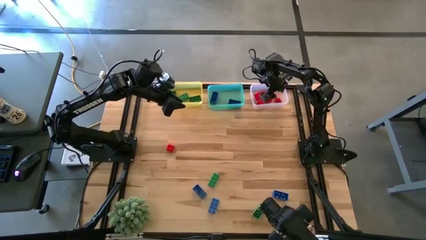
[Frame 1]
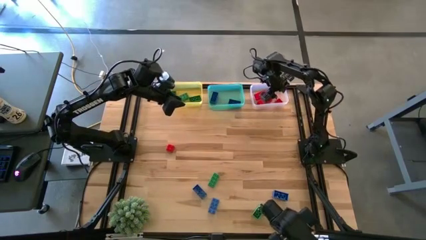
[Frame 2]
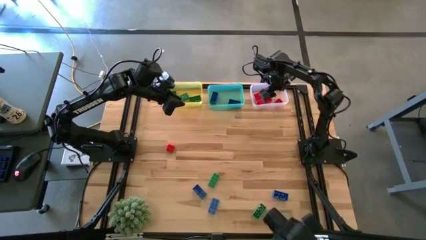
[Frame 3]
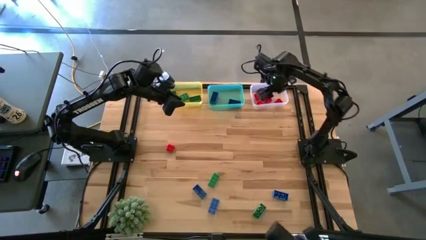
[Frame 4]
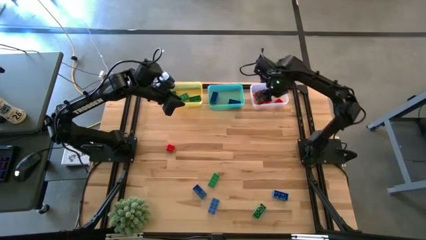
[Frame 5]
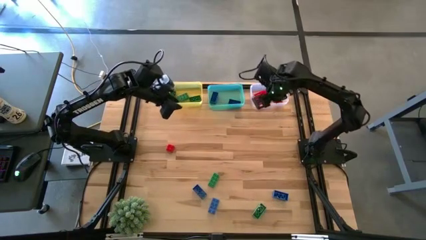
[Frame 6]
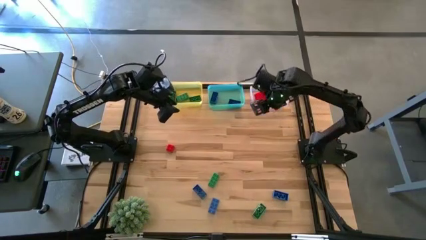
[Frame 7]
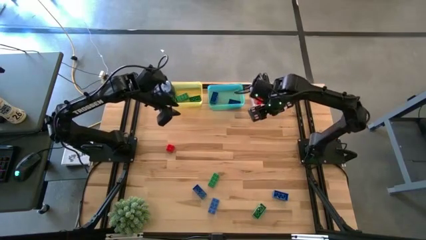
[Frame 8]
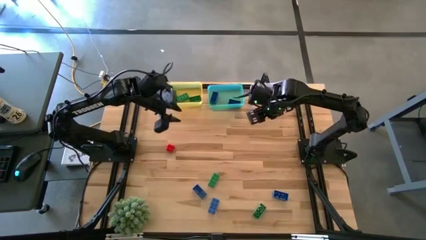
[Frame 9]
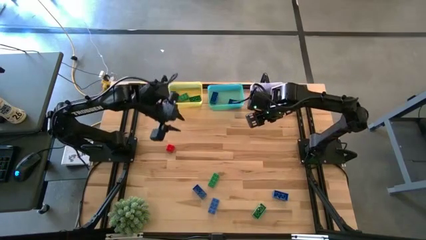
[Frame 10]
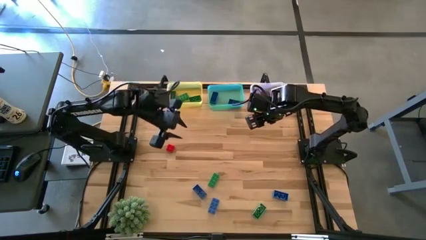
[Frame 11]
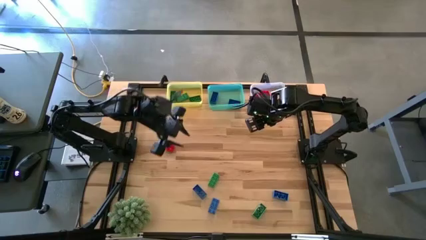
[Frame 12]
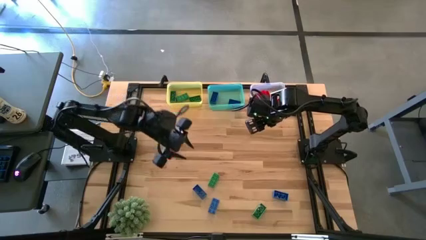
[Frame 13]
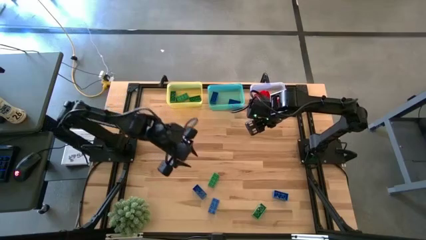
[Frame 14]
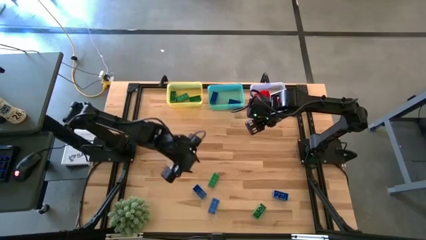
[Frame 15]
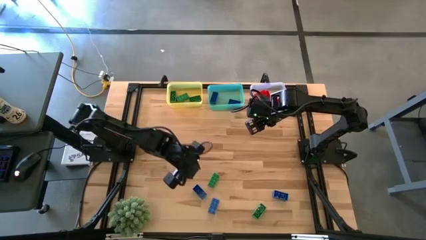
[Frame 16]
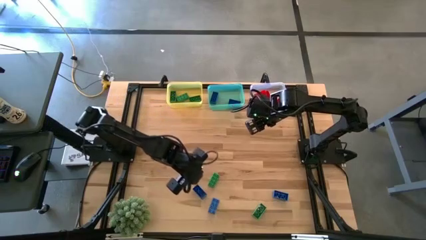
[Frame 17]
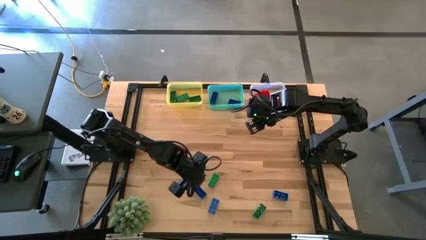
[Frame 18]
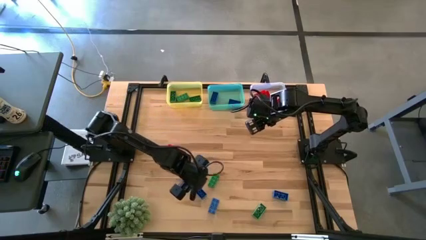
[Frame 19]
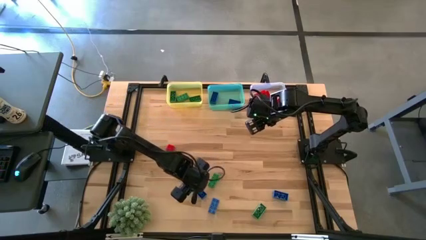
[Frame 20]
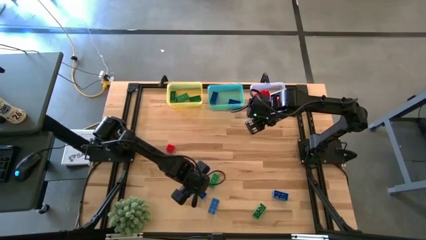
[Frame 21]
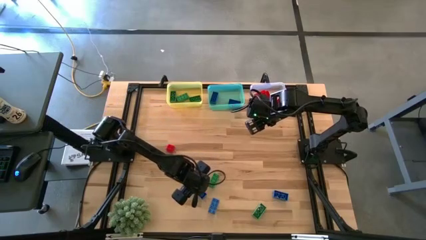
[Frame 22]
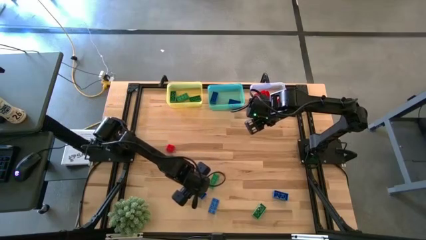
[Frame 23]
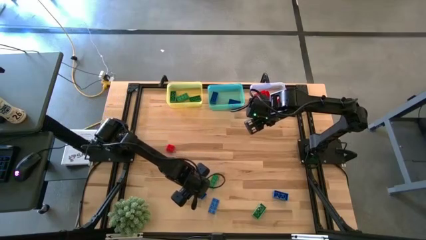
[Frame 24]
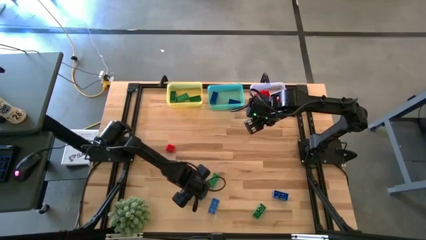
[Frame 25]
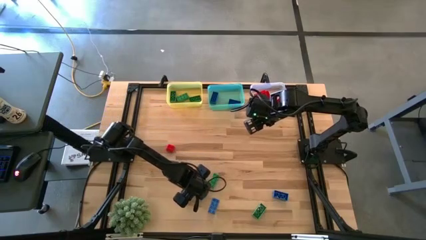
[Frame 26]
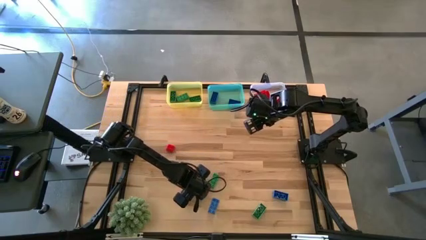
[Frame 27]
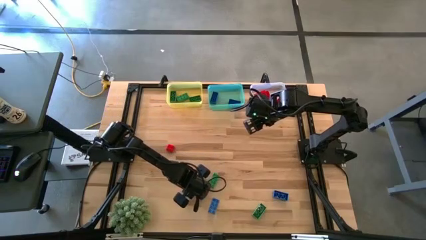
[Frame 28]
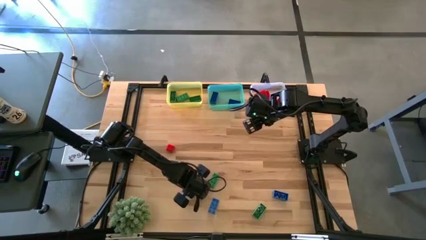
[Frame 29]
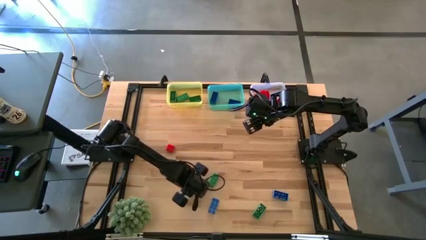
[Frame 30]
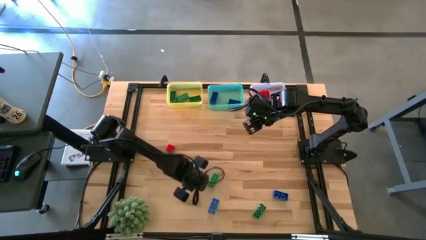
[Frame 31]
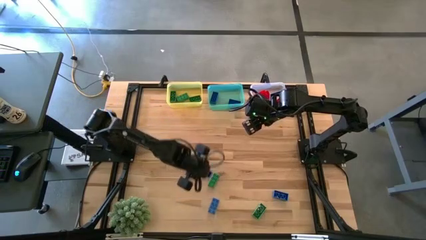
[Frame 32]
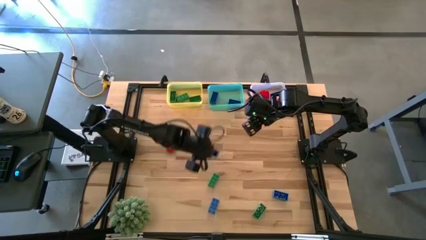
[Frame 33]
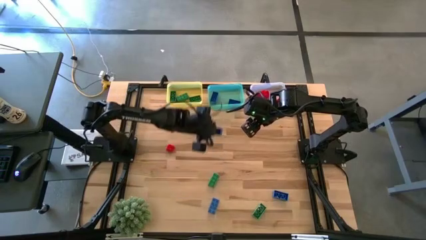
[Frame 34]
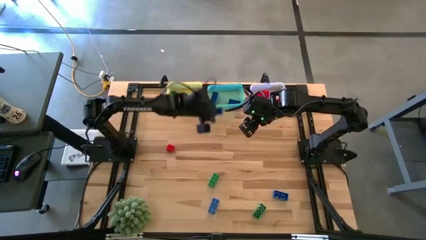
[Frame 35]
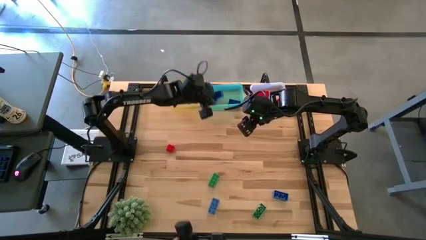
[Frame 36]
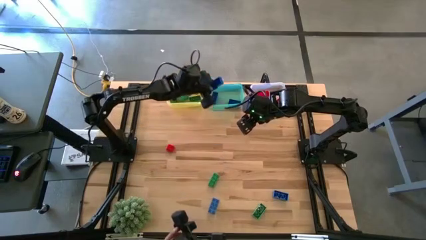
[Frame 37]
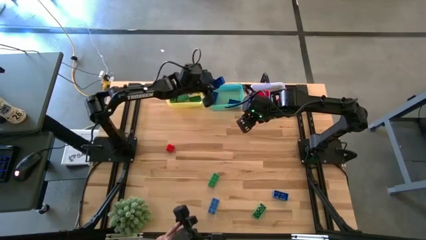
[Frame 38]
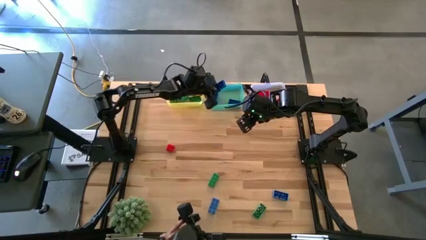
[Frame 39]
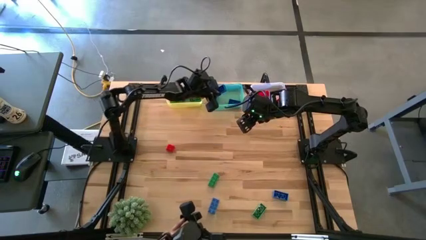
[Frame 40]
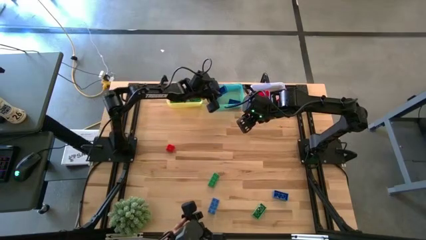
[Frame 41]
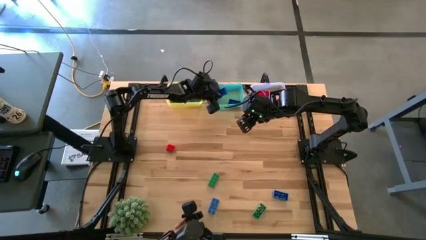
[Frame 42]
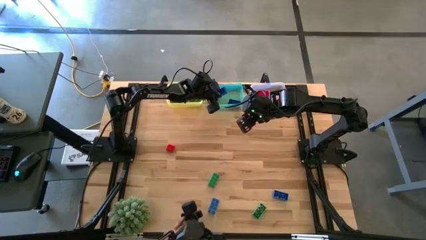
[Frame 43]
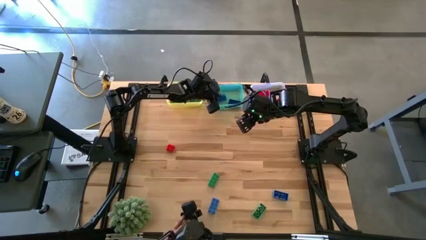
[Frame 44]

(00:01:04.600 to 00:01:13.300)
Task: Sort & place blocks by color
Put the blue game piece into the blue bin

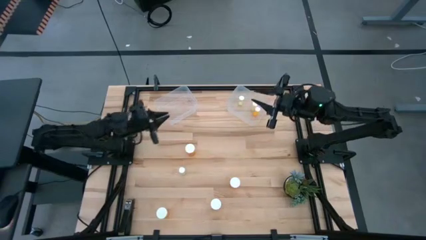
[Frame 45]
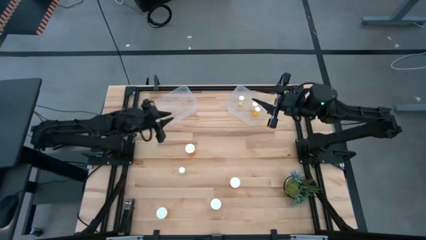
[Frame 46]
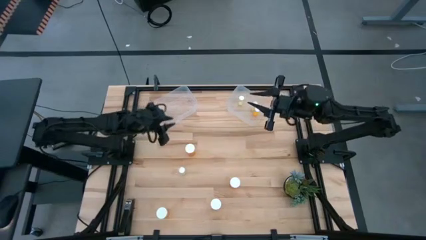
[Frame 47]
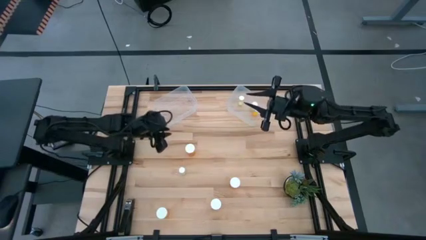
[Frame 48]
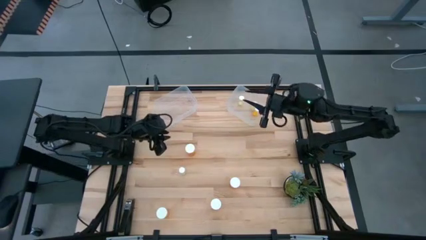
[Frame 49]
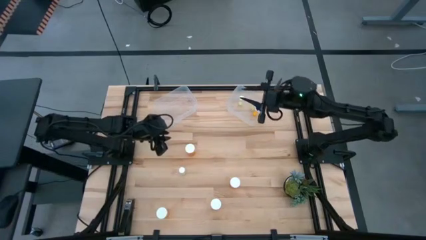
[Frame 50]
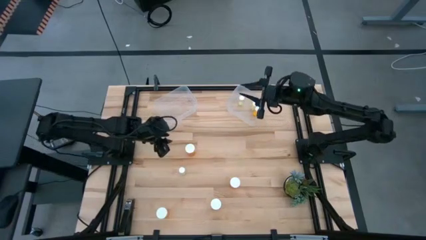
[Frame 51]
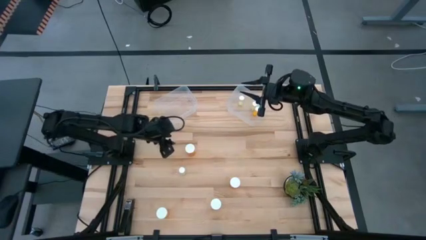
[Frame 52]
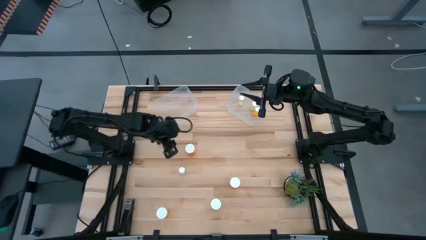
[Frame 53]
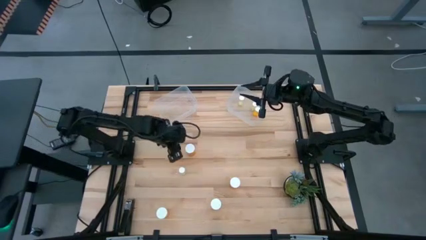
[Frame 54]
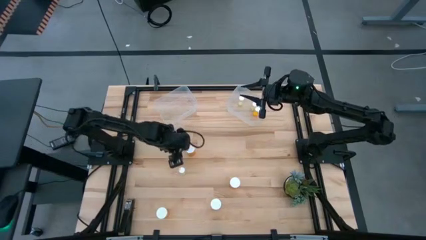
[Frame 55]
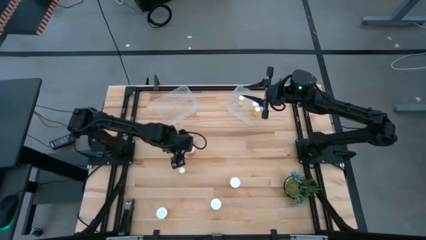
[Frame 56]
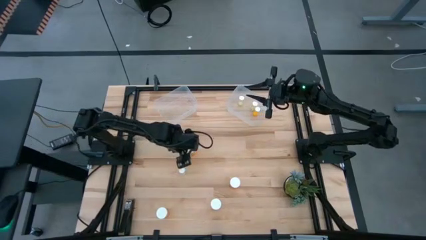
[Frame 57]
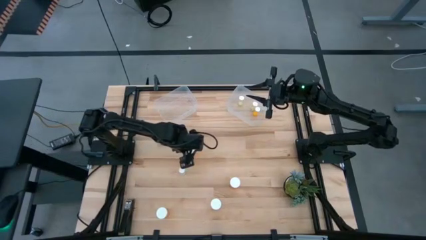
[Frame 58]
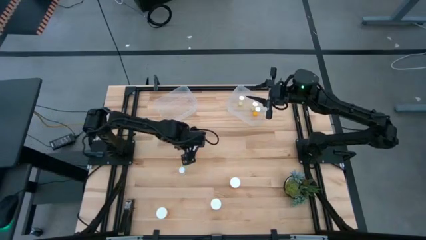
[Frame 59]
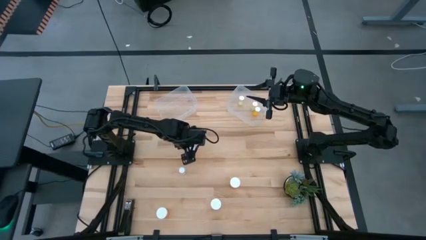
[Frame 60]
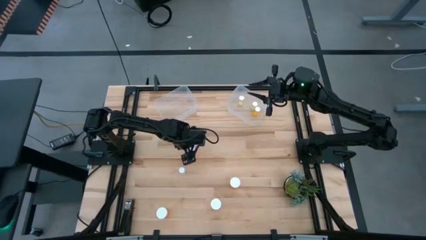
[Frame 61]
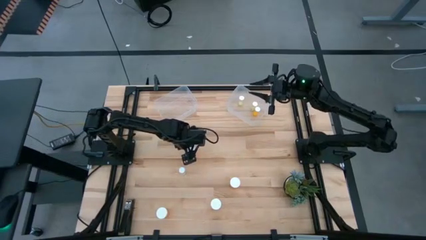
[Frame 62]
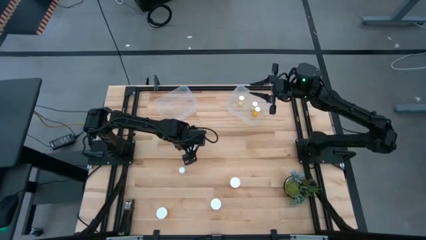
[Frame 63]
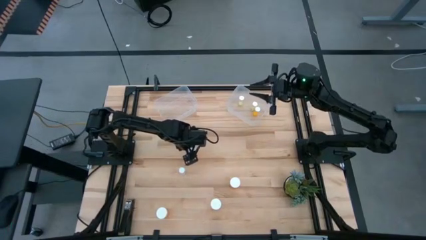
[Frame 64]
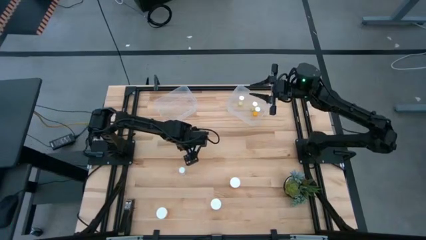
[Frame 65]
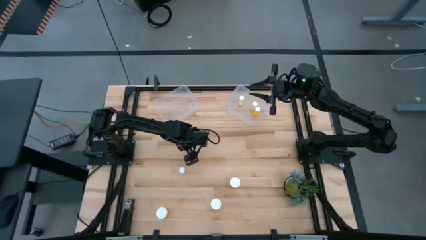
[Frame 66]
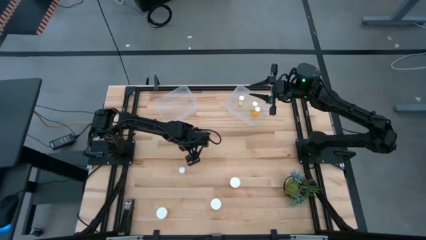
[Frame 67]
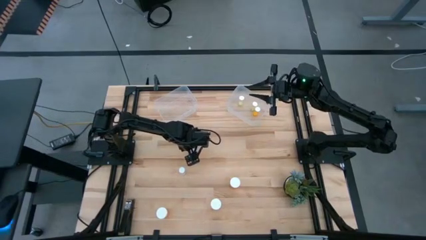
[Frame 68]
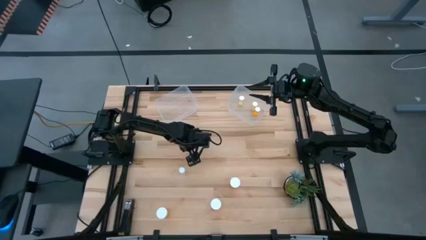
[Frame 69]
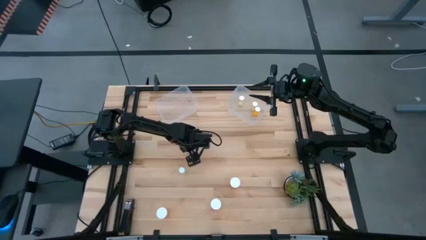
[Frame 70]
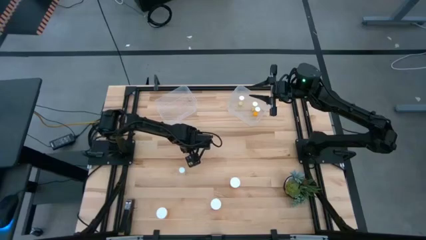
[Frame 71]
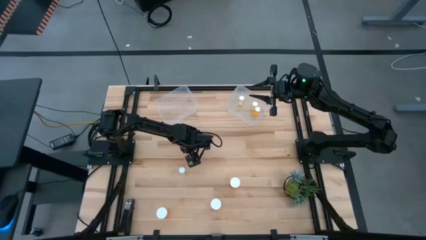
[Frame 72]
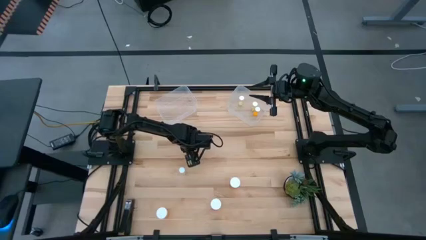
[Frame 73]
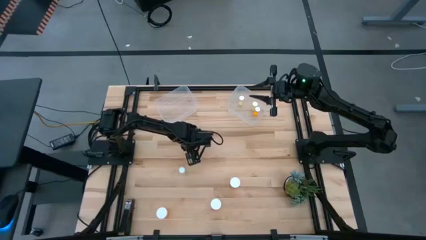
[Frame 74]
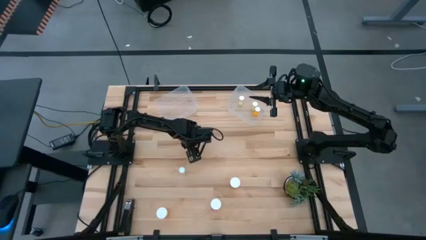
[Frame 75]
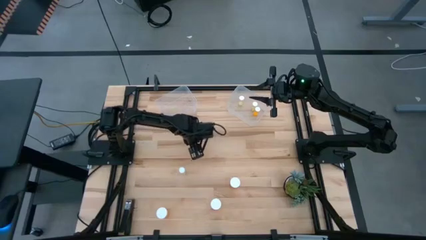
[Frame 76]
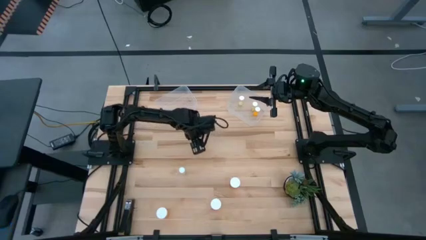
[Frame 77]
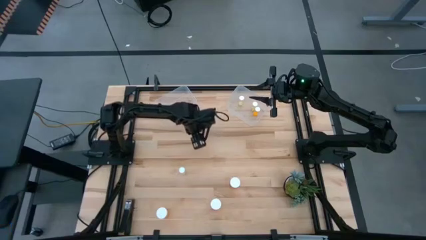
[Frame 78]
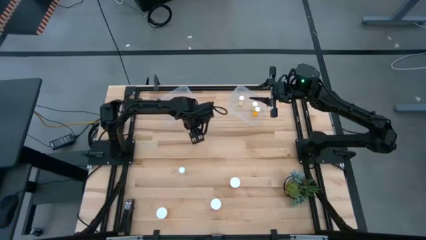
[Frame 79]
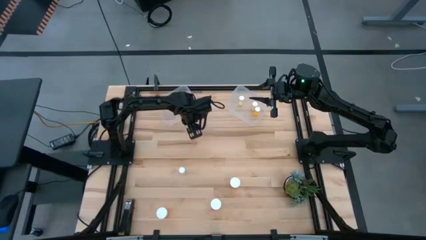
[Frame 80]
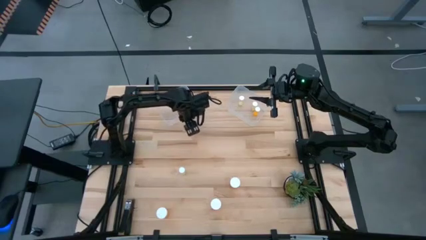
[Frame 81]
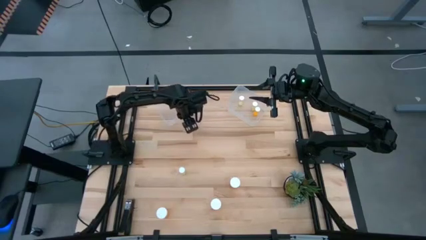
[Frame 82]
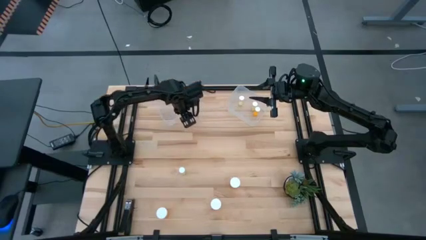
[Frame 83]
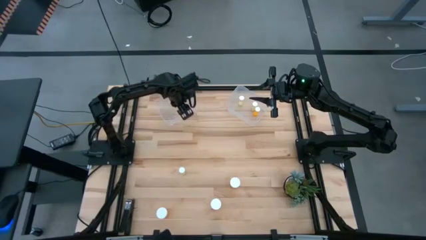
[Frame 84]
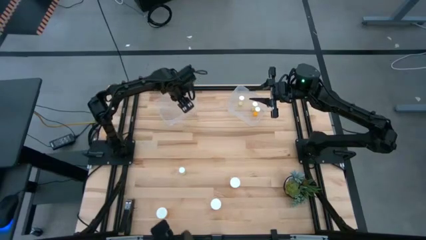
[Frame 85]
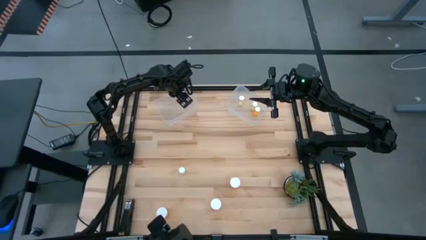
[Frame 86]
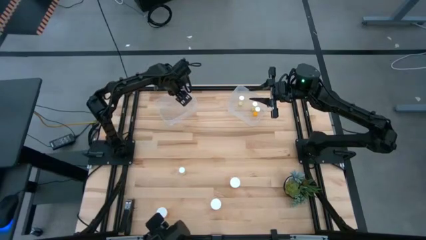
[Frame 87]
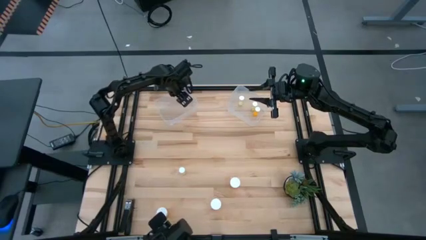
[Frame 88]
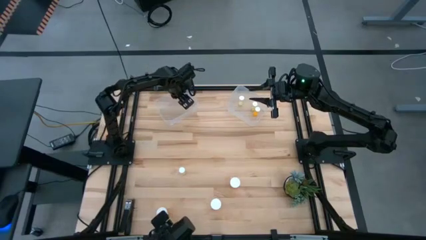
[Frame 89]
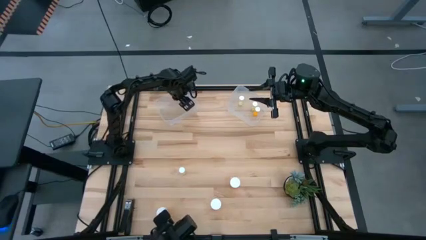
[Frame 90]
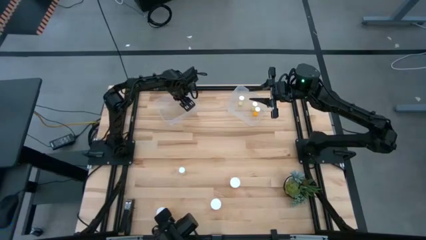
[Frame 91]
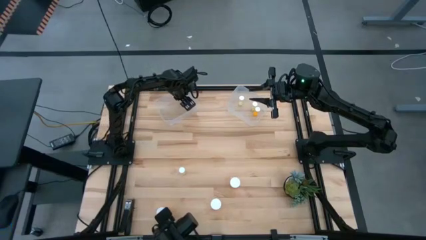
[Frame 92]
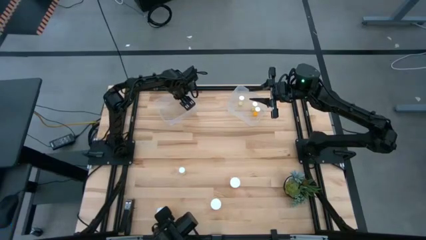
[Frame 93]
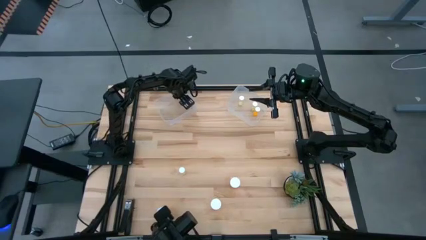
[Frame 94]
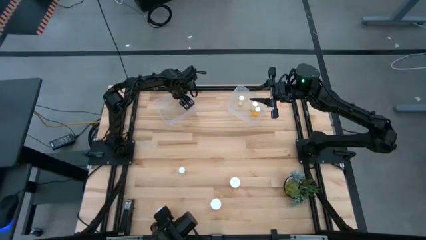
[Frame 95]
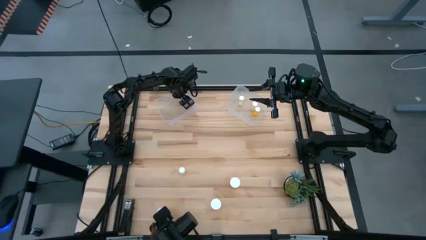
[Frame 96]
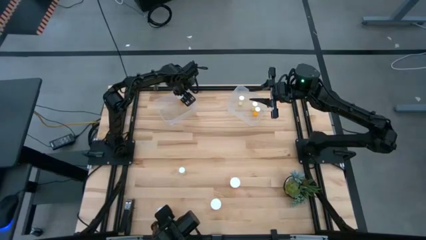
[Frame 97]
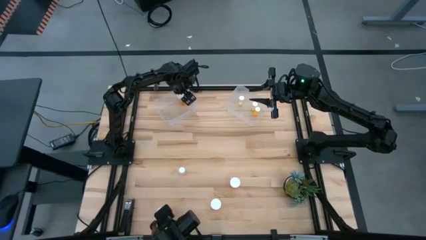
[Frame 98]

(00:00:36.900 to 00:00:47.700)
Task: Pick and place medicine bottles into bin by pill shape (circle, oval)
Put the large orange pill bottle into the left transparent bin
